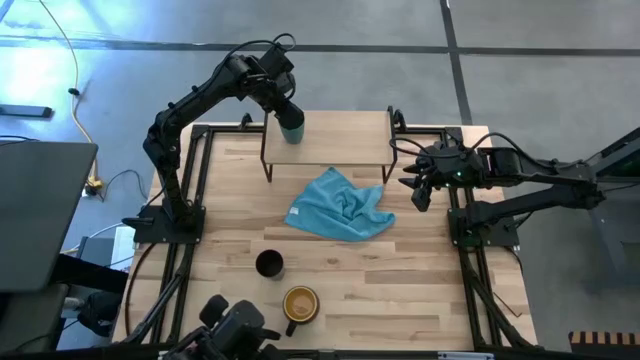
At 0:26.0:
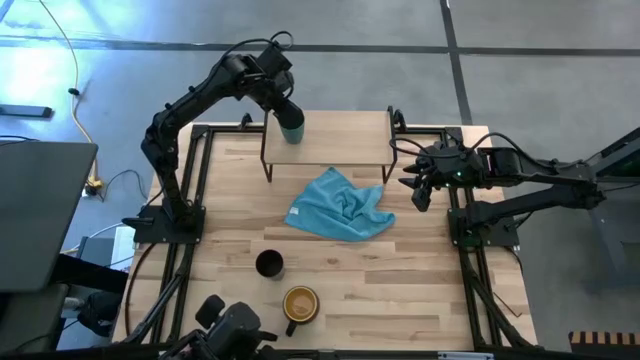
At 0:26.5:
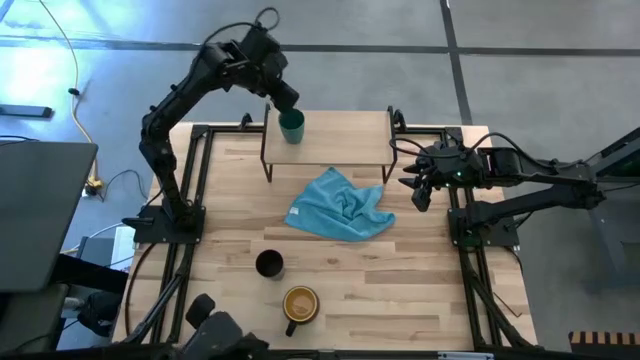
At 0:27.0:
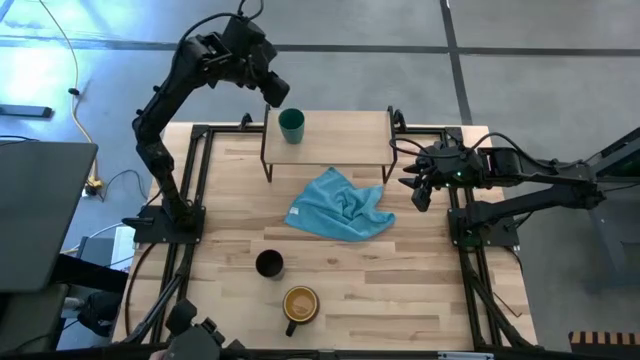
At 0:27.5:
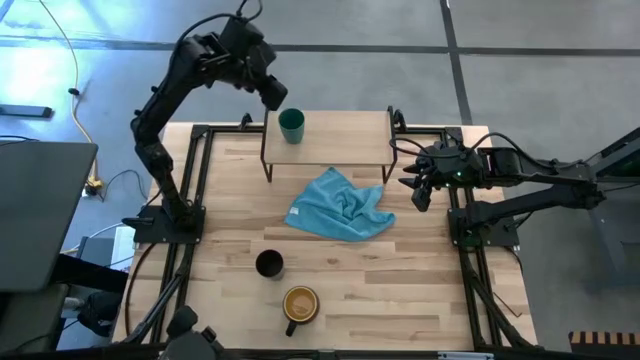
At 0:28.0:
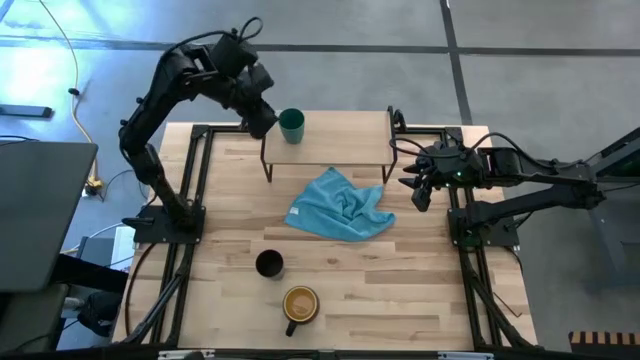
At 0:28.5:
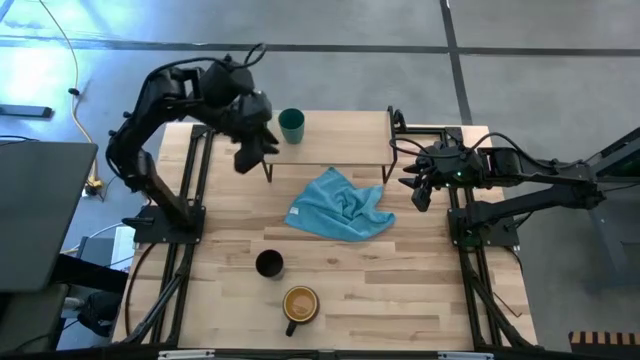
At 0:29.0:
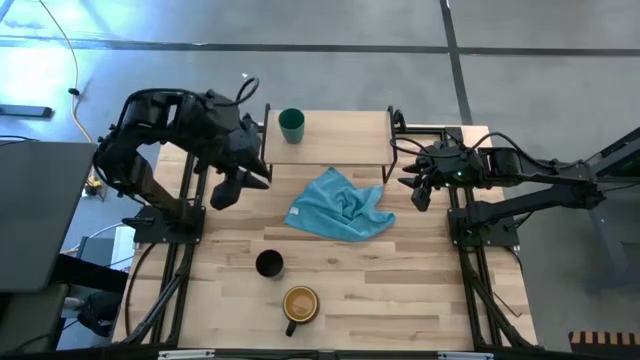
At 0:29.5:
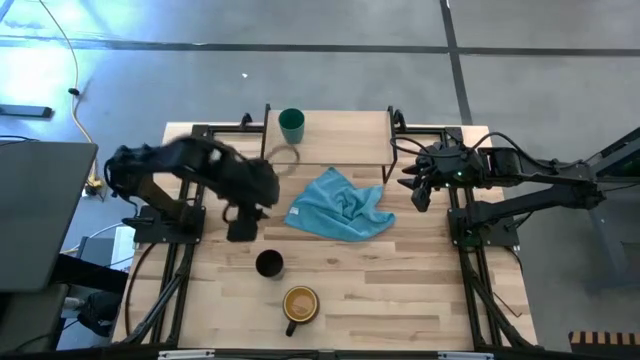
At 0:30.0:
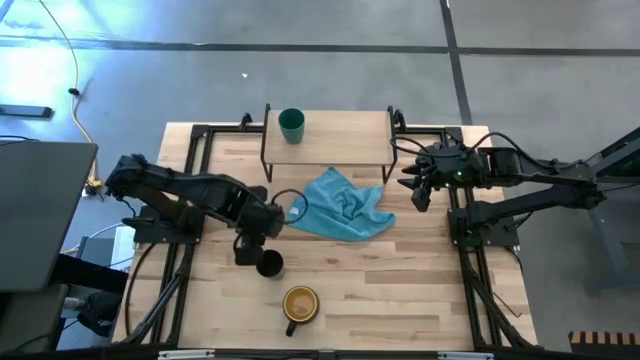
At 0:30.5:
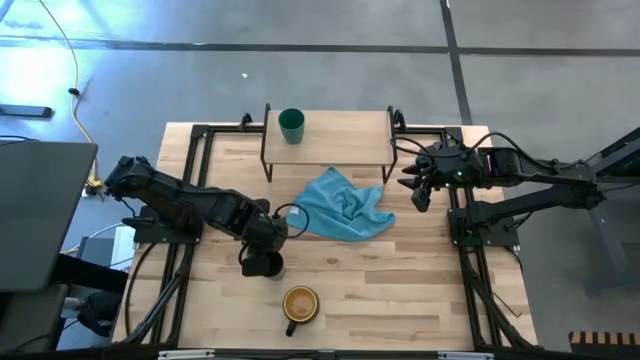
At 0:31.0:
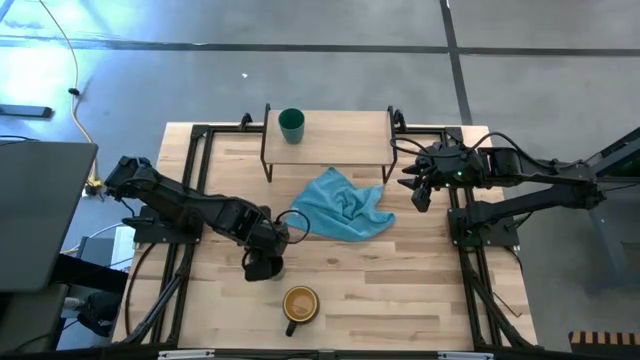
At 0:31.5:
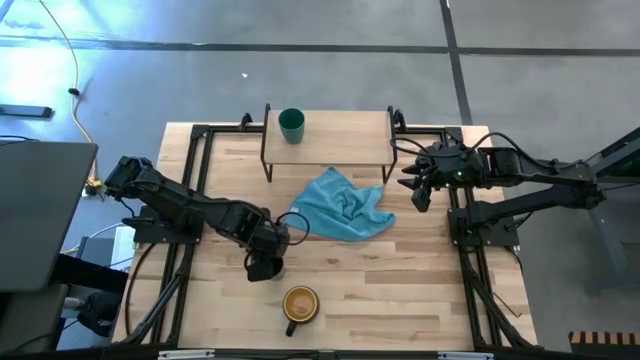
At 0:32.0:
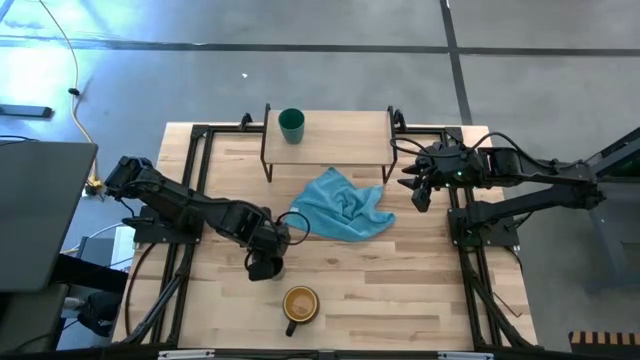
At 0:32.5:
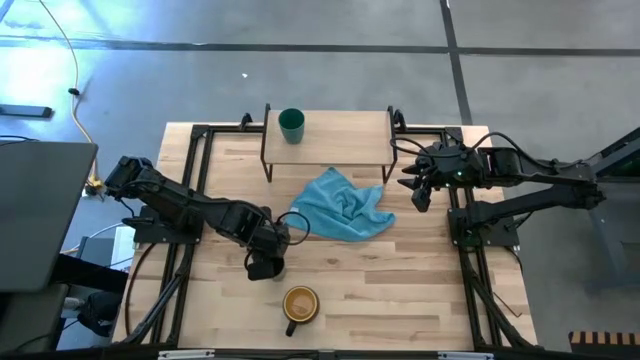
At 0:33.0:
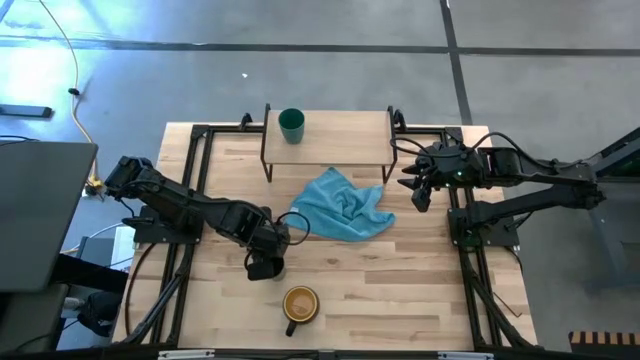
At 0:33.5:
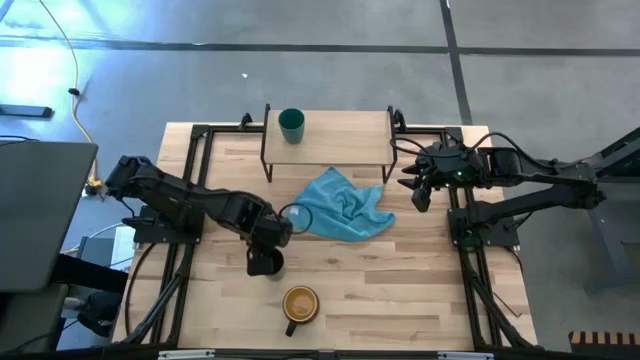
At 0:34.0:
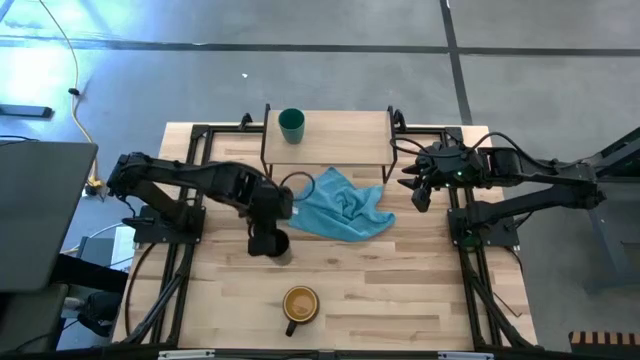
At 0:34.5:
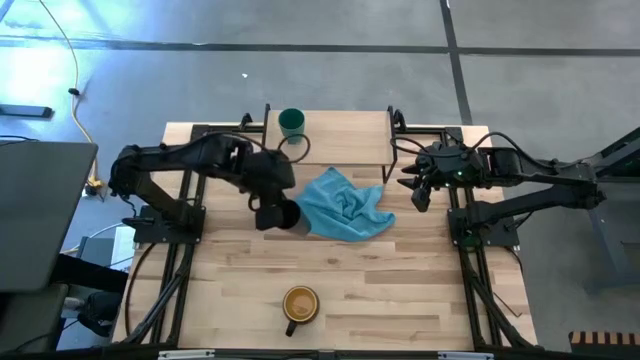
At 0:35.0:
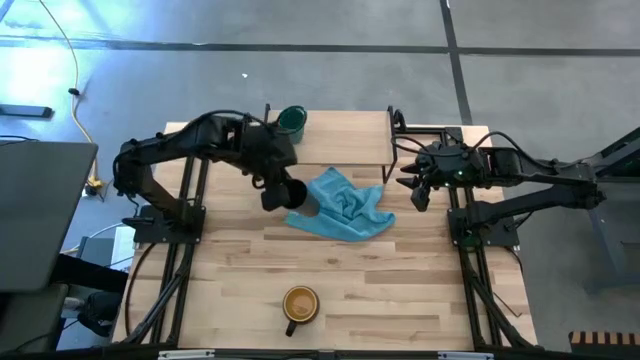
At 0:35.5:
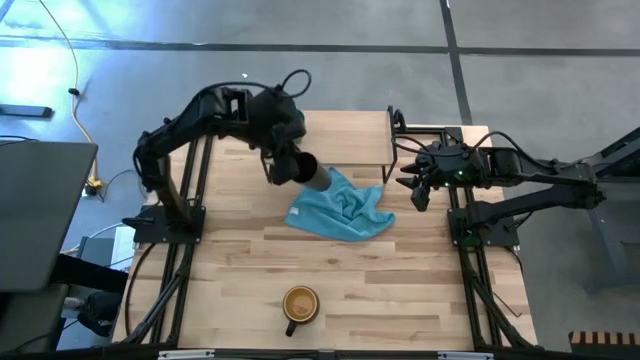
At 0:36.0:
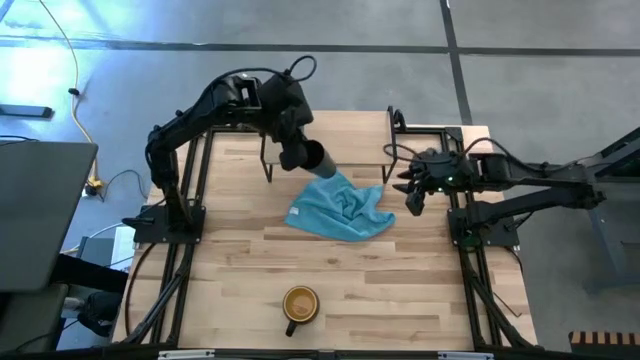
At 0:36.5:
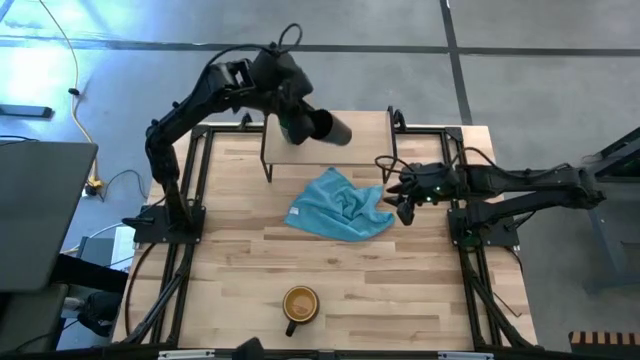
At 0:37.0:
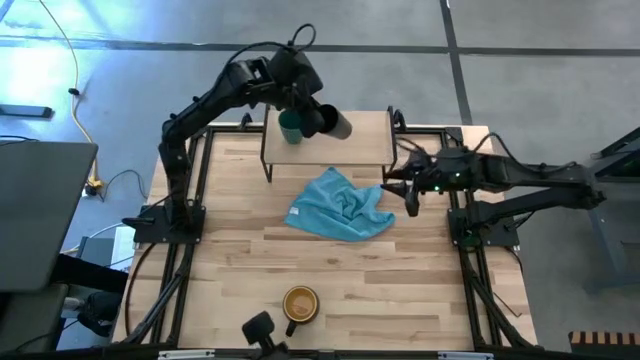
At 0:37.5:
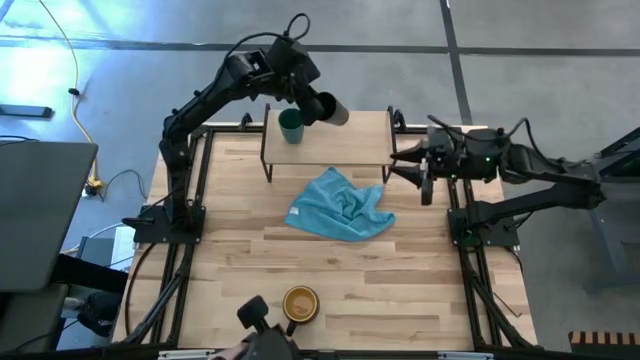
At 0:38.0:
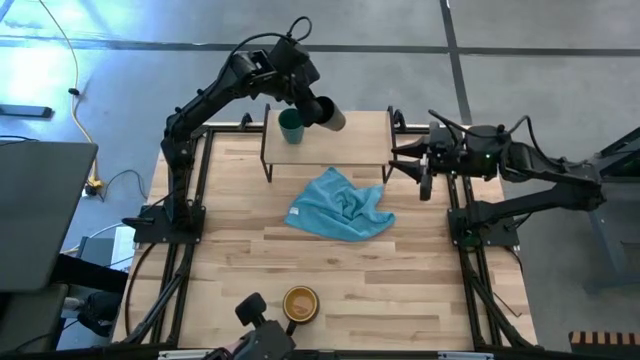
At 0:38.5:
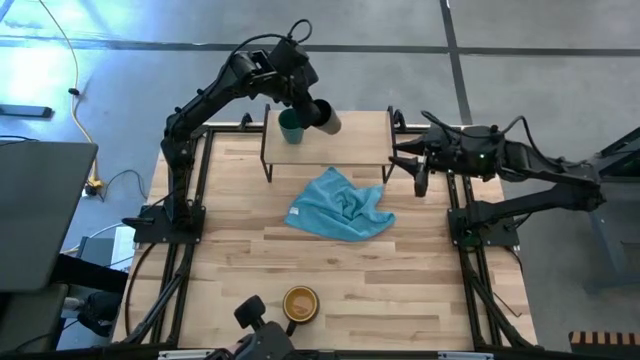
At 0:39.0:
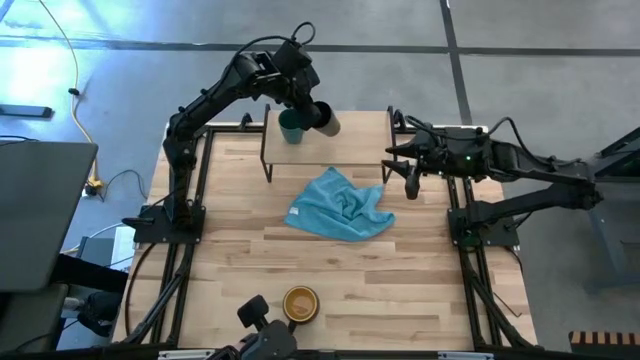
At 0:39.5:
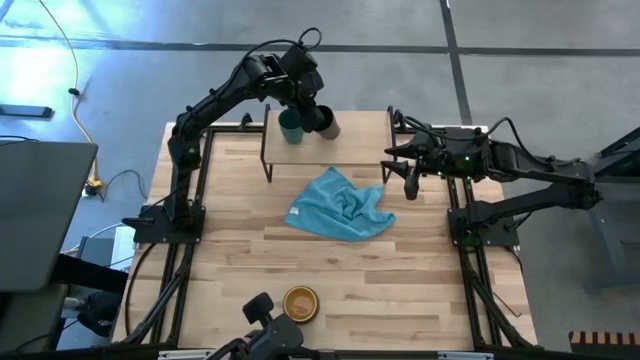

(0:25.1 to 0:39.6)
Task: Stack small to large cups/mugs on shelf
Put the black cup on the shelf

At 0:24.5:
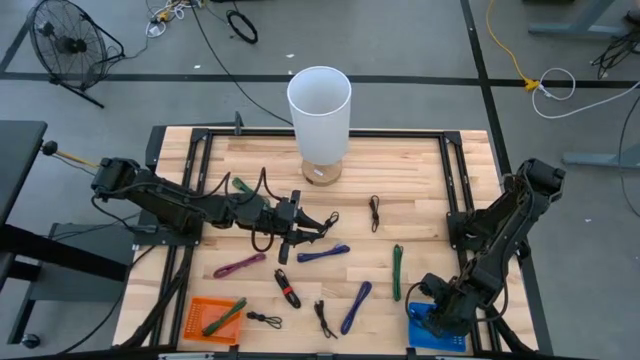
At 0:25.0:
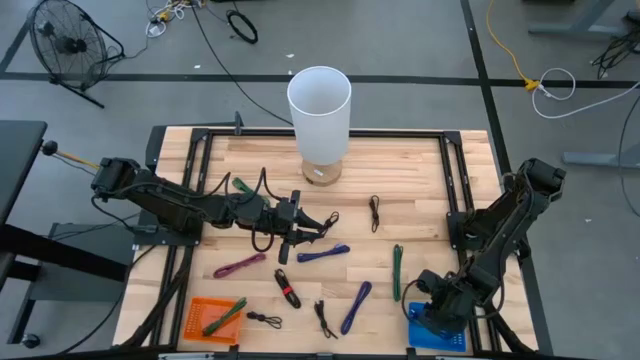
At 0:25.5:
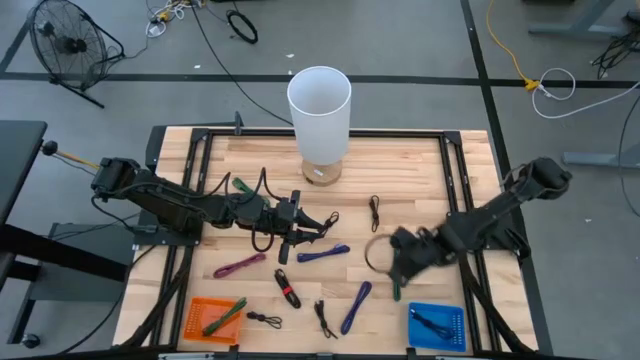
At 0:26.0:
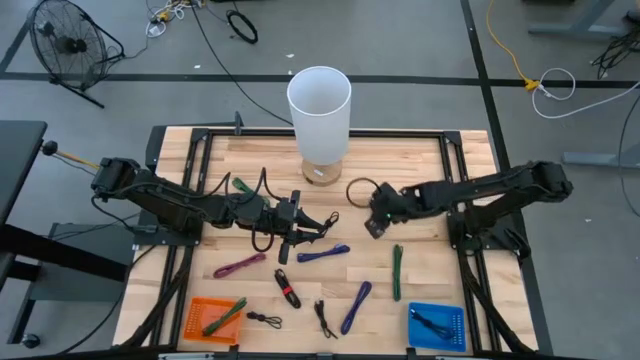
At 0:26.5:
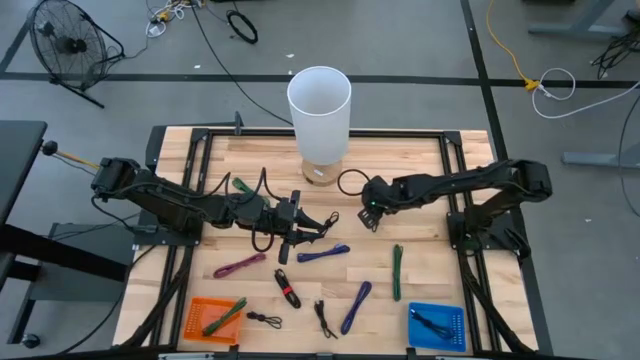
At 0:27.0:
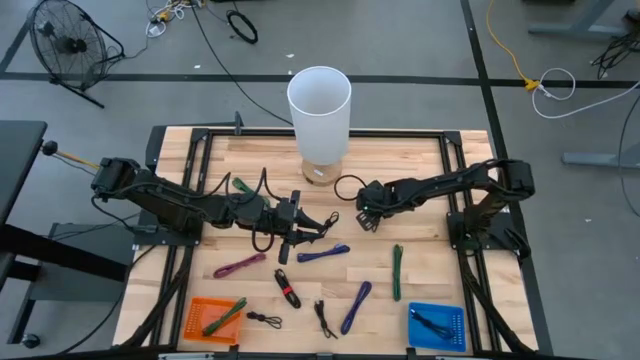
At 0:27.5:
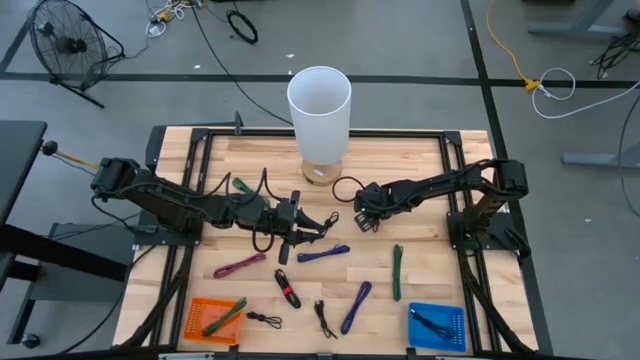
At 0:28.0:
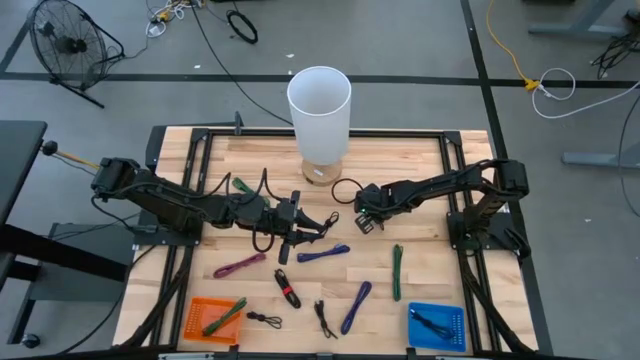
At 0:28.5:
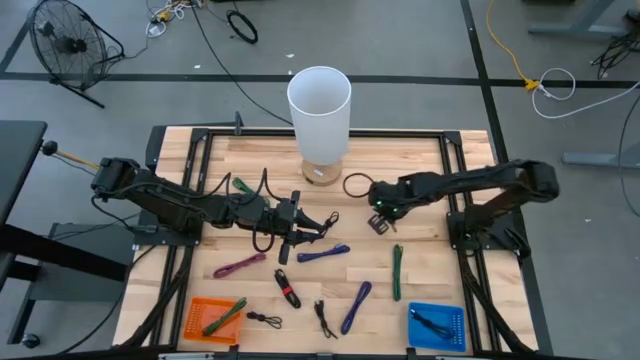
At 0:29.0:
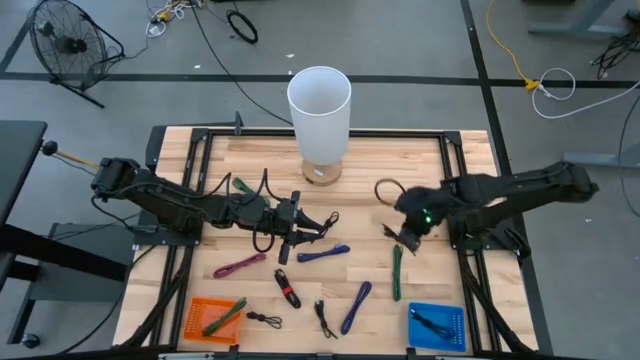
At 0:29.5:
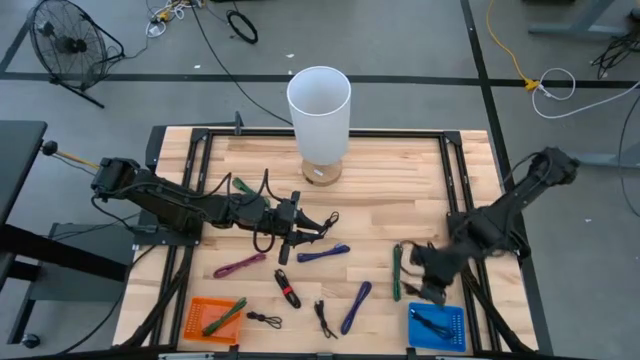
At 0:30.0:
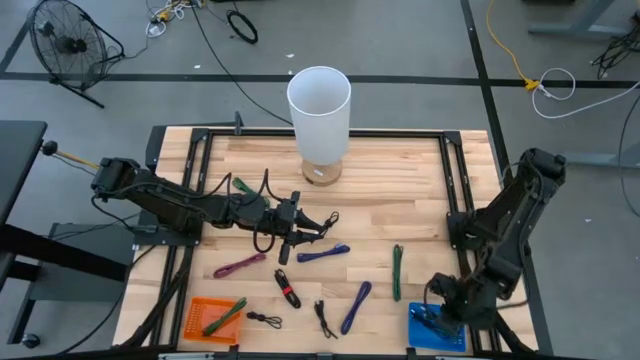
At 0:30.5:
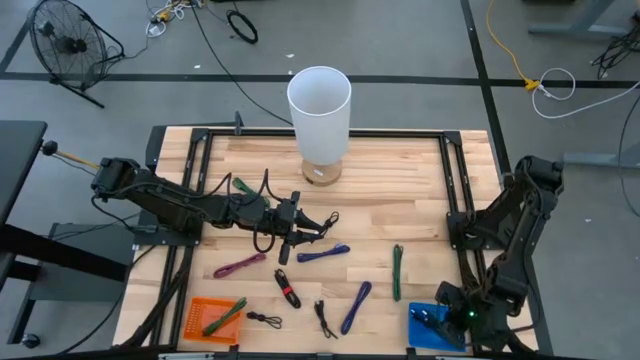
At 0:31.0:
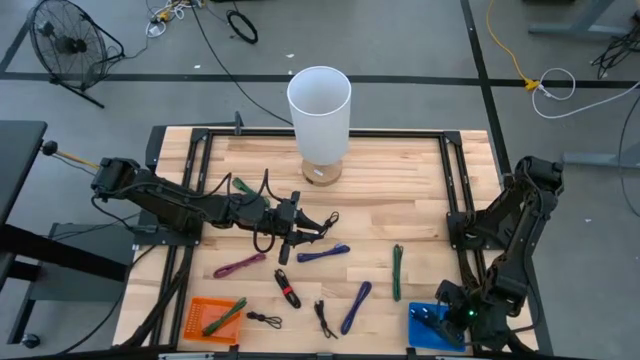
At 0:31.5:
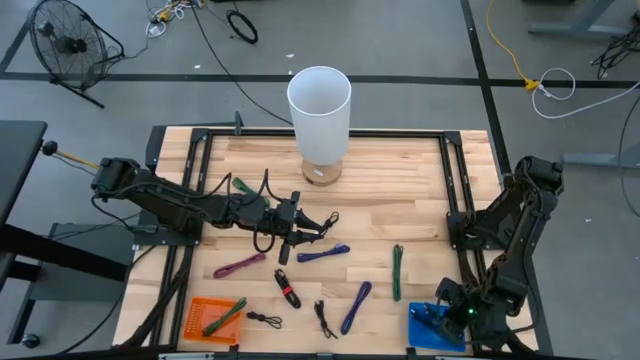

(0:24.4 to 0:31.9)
Task: Pick & Place USB Port
Put the black charger cable into the blue bin
